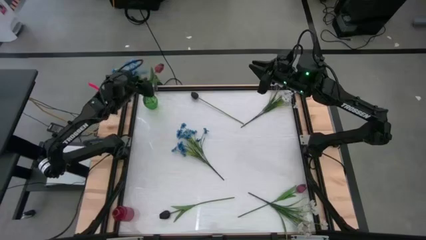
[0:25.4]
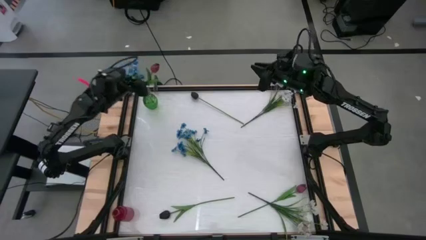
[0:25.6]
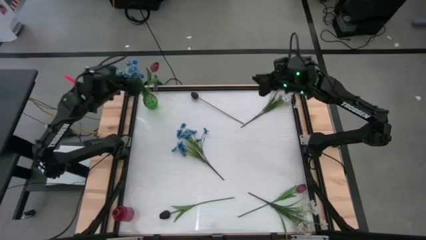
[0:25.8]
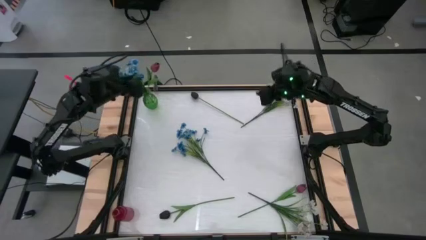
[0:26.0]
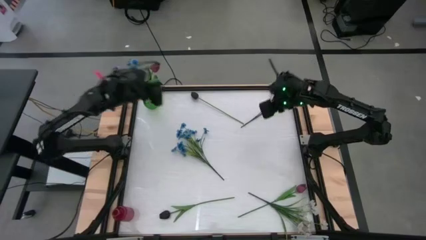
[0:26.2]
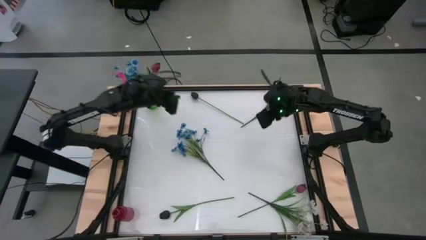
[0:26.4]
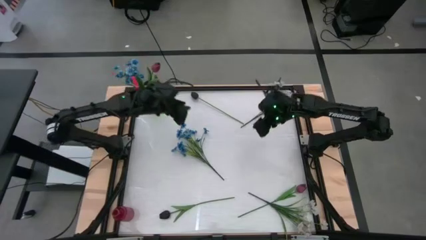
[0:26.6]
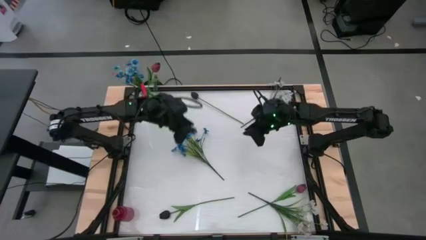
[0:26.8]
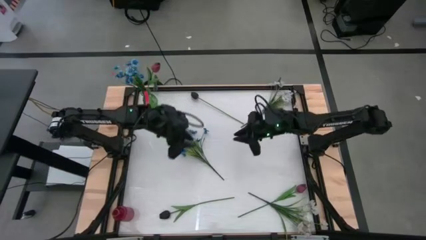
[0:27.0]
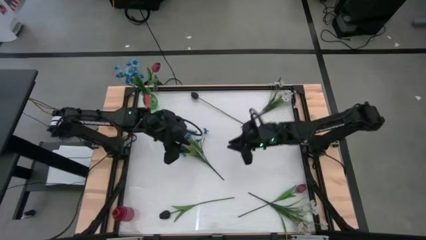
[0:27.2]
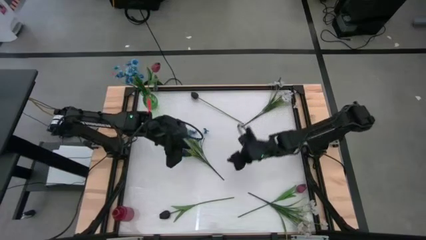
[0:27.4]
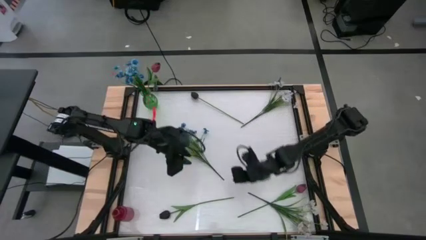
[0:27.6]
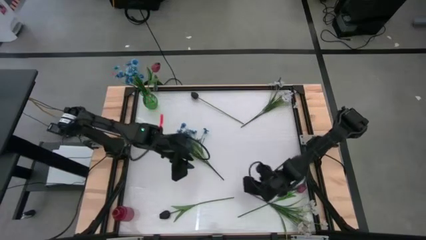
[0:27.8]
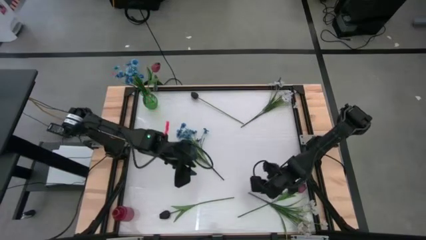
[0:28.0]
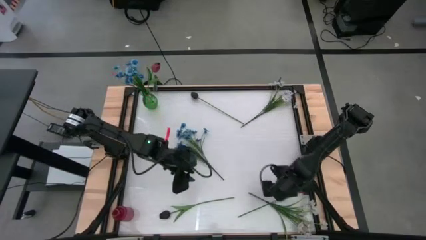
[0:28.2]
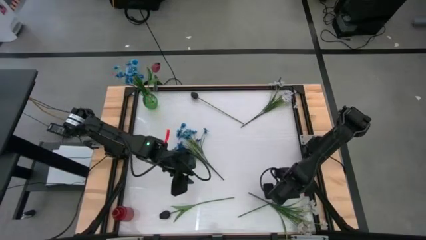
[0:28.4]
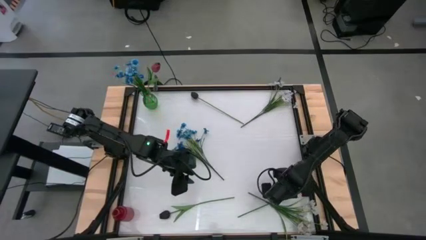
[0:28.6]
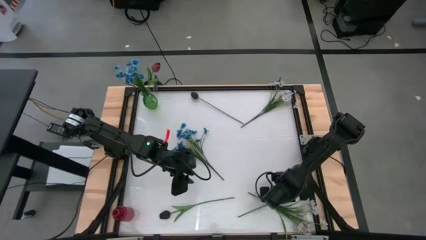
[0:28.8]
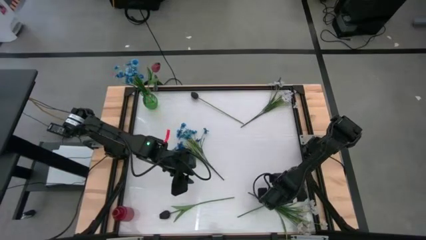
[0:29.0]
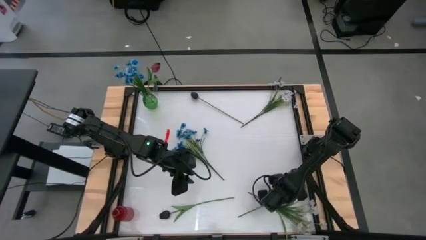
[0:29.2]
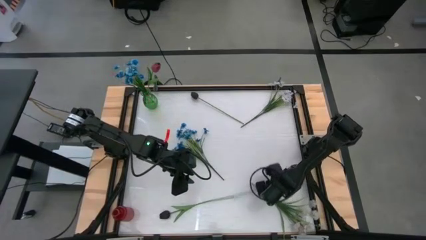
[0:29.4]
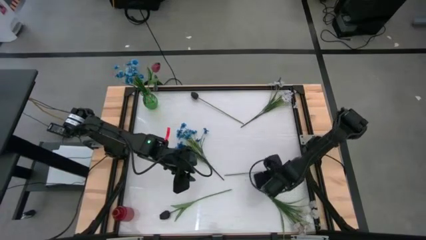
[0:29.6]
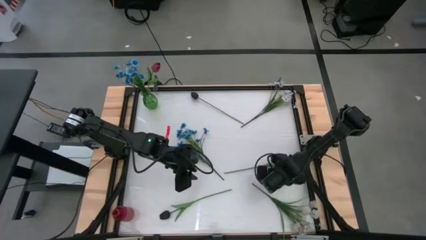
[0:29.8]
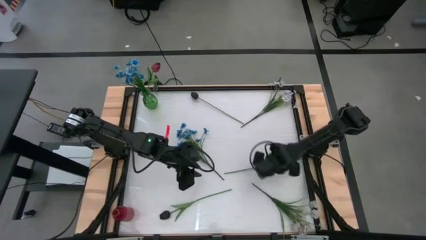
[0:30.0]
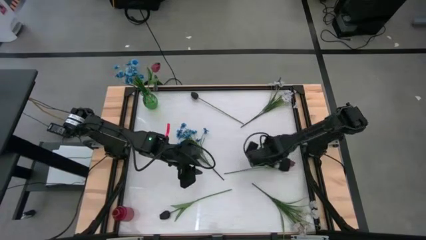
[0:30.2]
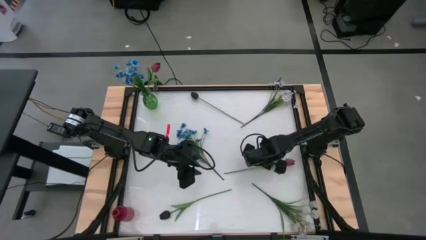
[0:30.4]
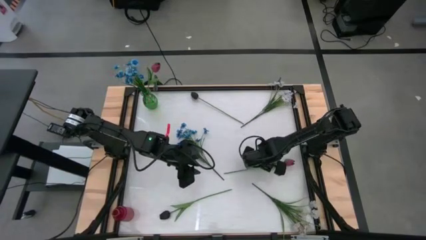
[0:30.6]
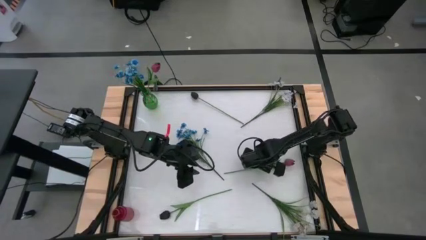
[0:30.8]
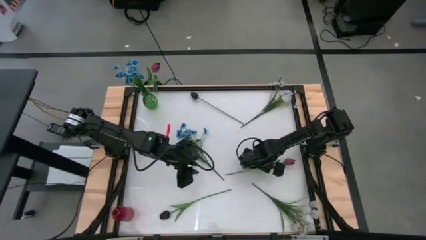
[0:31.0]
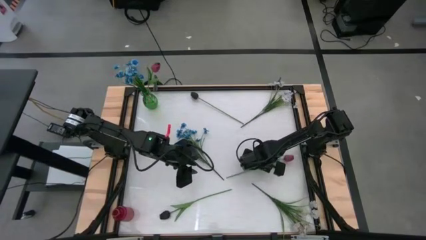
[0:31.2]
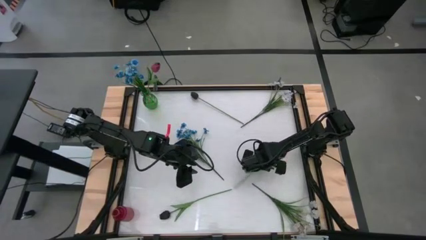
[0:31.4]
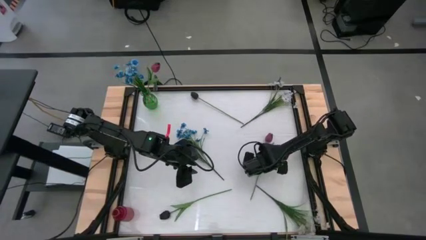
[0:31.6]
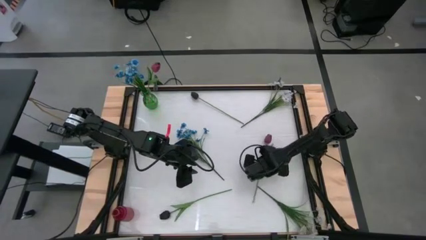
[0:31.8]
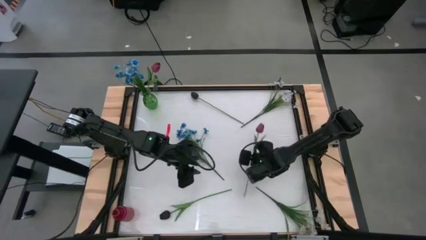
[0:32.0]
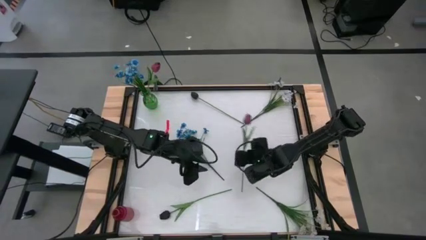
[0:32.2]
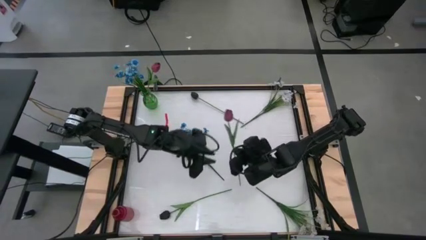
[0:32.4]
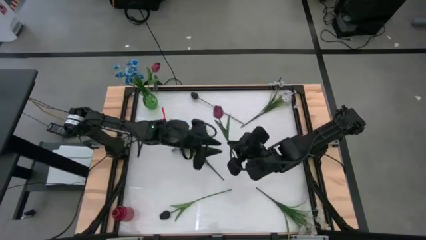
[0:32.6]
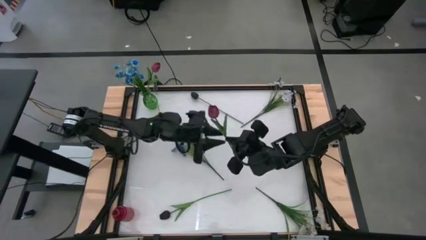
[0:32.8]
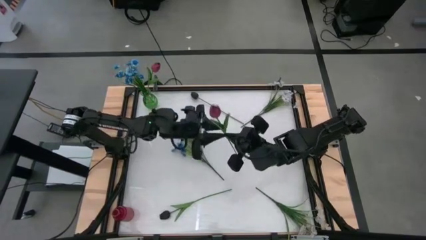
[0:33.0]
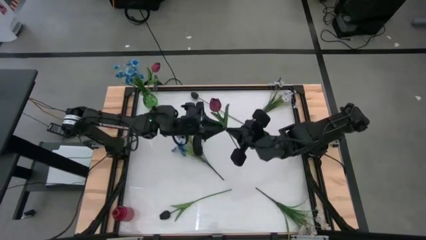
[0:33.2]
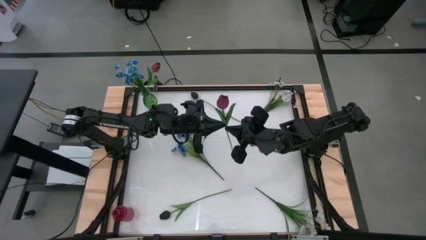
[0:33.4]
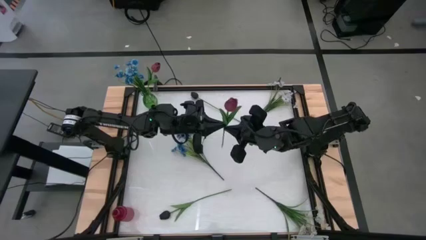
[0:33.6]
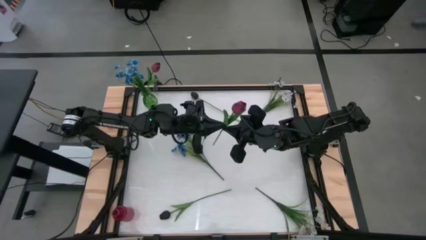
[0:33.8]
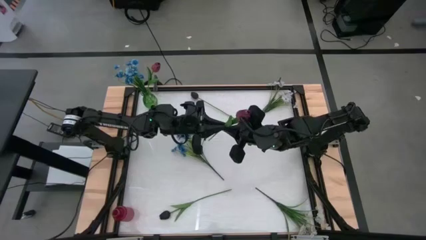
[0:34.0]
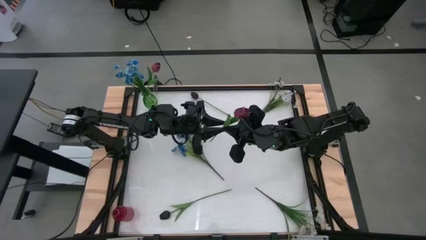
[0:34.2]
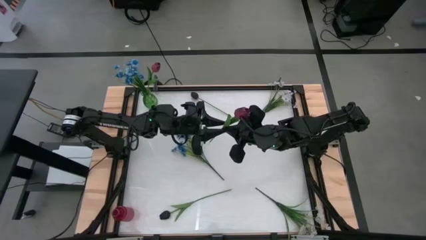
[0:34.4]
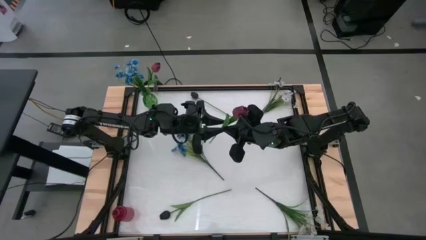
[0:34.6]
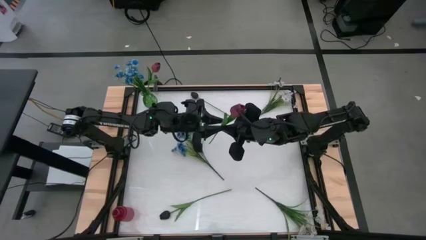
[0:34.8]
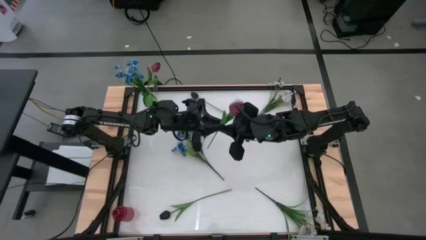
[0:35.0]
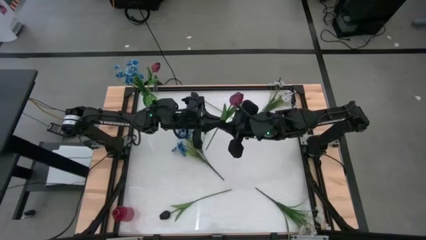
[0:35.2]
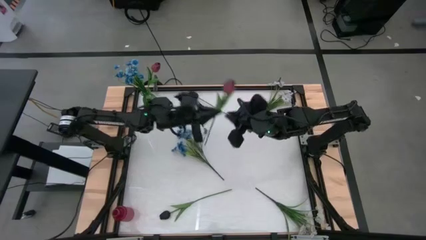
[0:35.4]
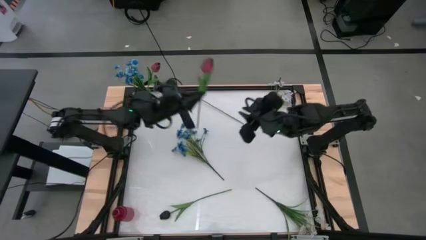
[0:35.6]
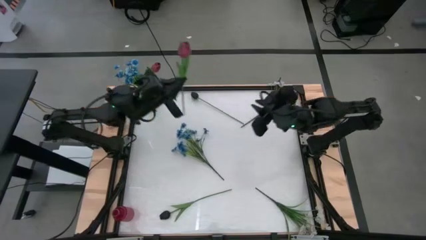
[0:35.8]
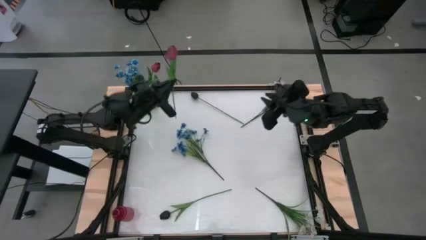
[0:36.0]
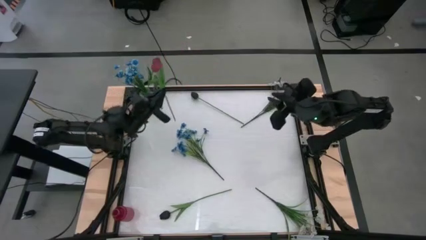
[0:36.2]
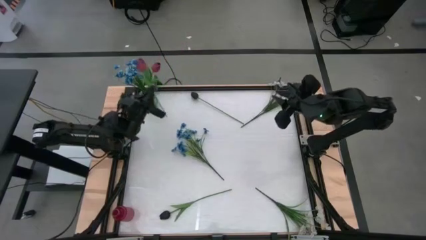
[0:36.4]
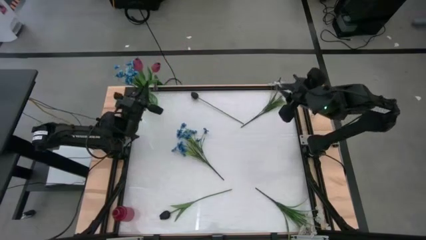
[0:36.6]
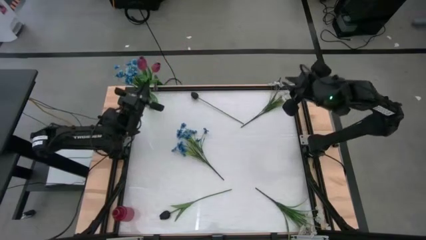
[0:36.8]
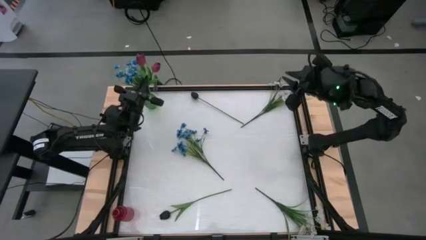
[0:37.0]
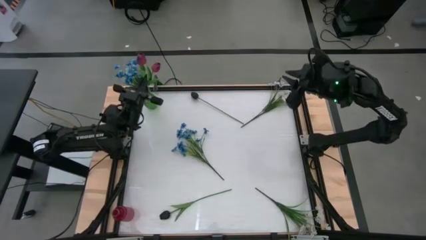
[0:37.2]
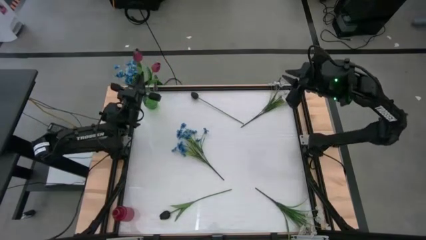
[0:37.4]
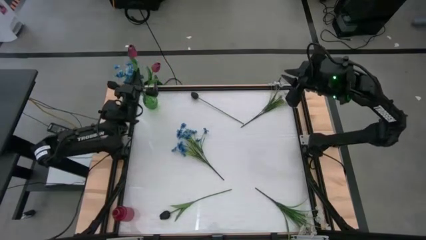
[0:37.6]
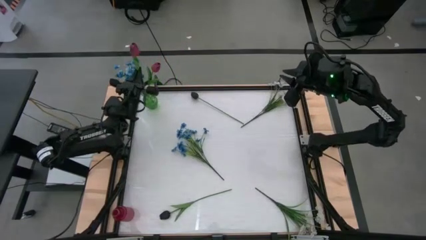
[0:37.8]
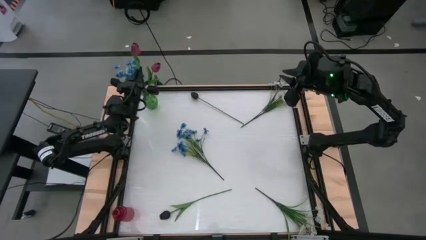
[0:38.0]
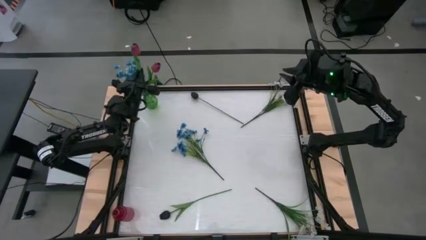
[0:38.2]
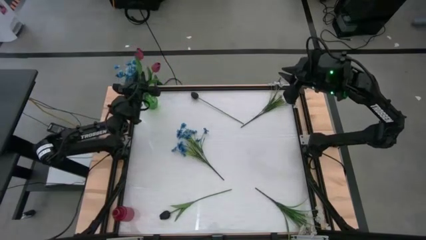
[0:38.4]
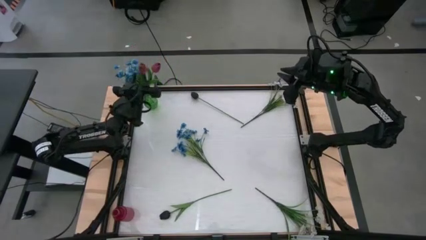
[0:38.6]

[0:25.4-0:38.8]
Task: Sort flowers into vase by color
Put the red tulip into the green vase

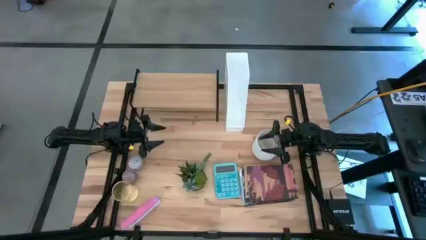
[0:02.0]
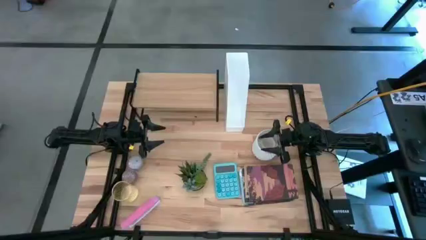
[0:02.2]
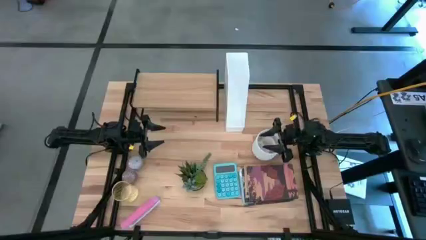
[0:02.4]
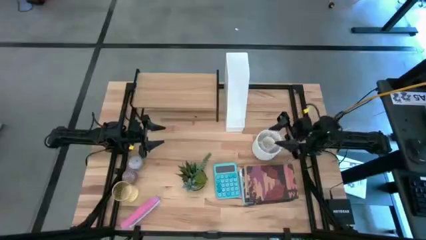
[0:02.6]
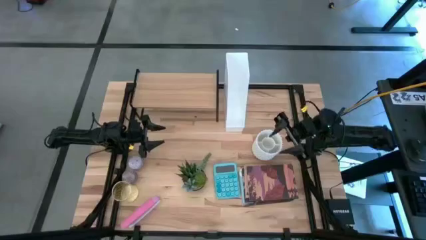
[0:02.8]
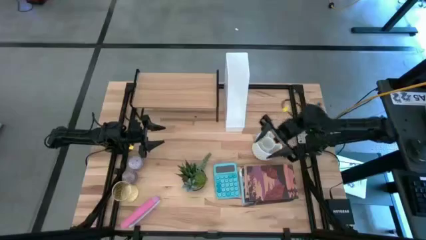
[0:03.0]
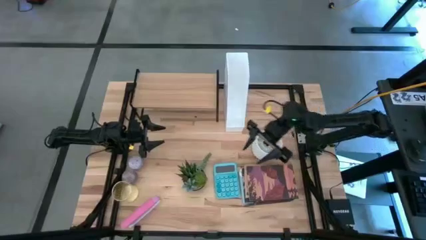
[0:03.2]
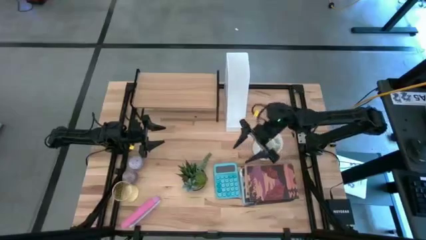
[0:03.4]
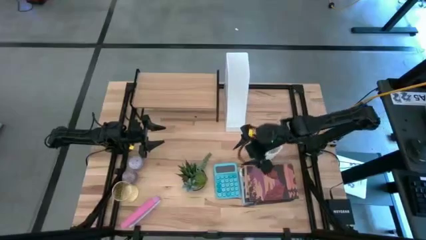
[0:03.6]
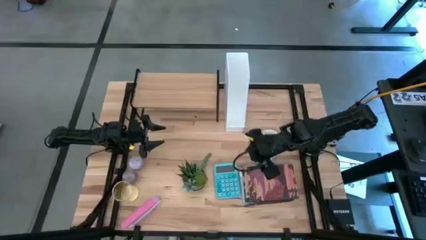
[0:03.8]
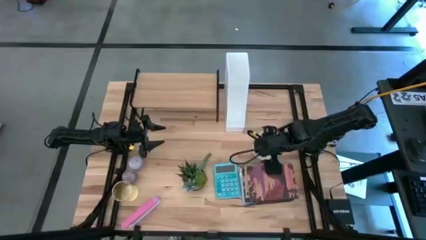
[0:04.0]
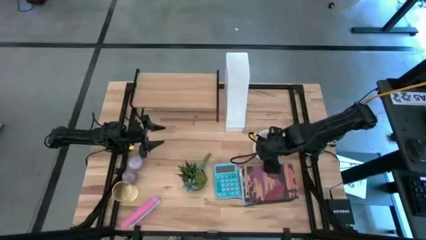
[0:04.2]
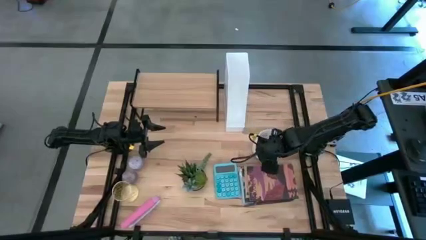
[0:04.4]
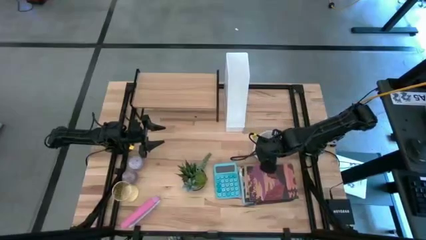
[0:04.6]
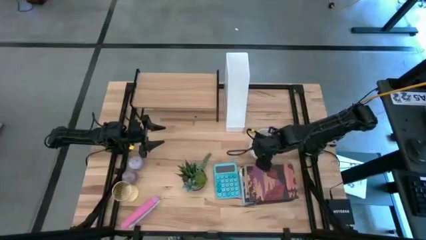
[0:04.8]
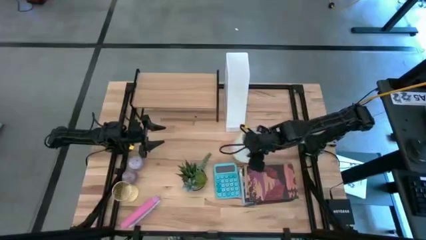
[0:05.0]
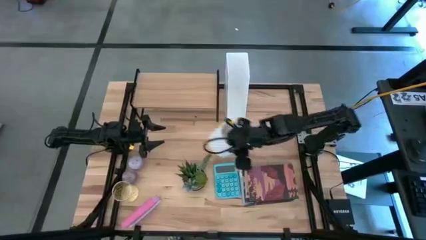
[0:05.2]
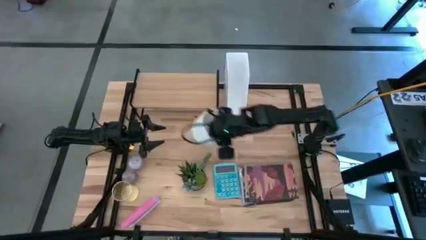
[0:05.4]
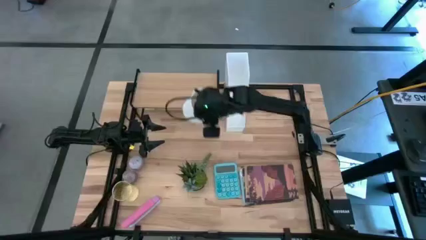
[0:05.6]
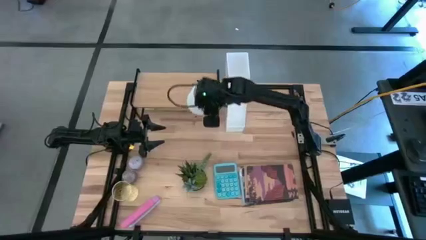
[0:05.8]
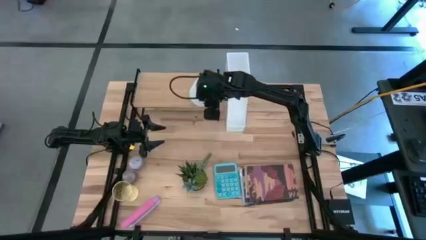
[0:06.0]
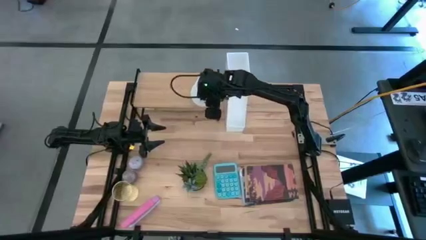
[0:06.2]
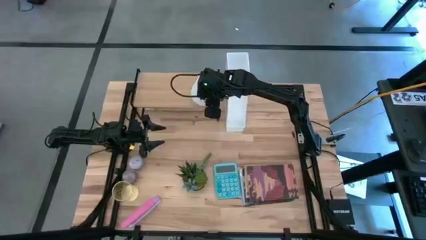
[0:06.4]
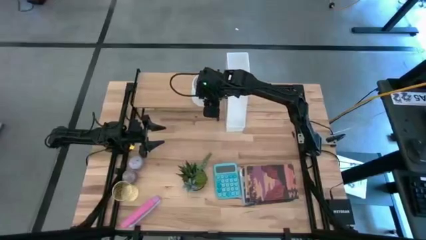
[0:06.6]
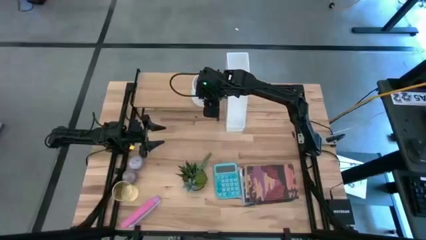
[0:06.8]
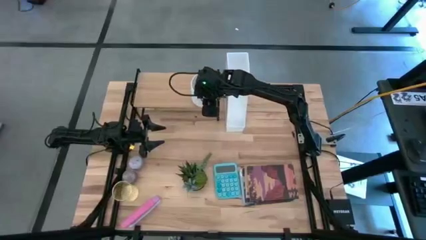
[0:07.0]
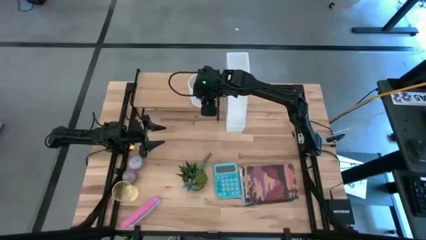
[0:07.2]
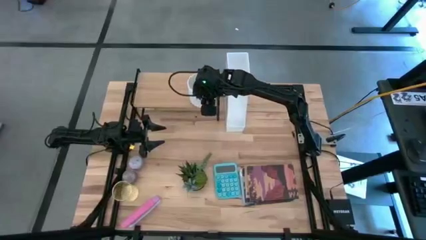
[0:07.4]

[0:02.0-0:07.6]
Task: Stock shelves
Put the white pen organizer on the shelf
